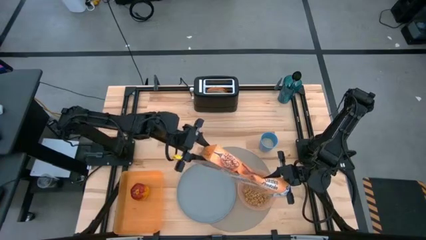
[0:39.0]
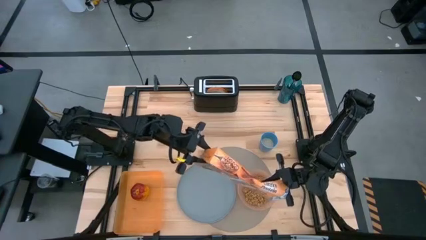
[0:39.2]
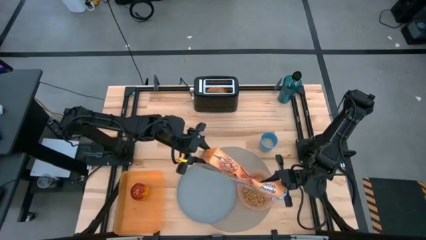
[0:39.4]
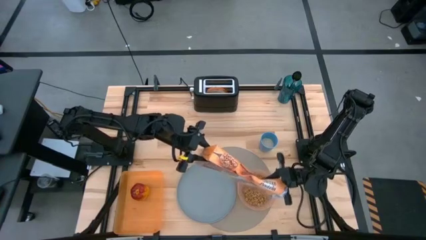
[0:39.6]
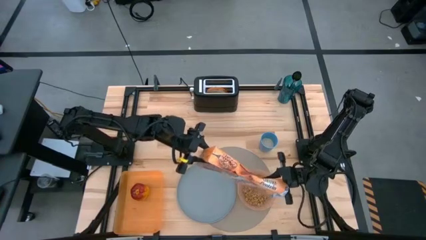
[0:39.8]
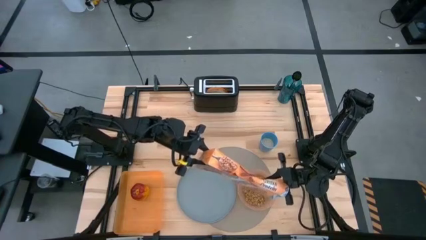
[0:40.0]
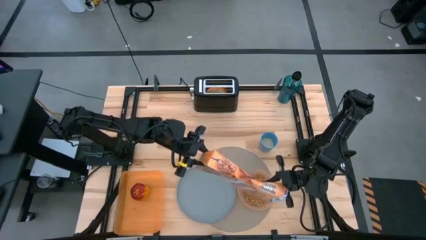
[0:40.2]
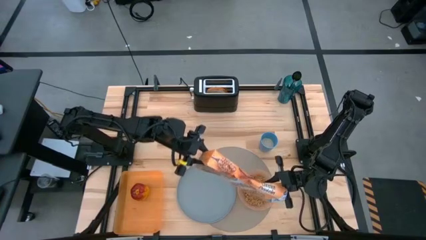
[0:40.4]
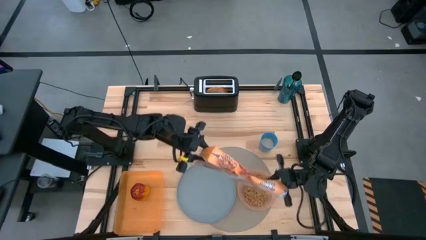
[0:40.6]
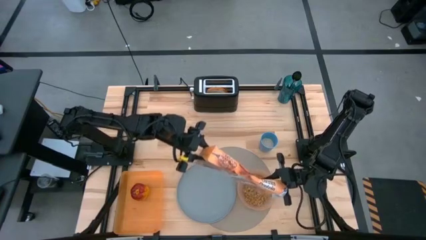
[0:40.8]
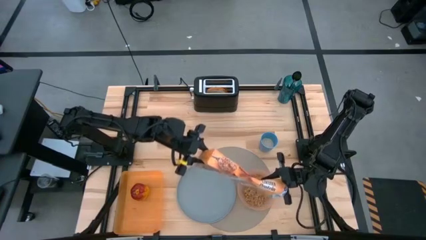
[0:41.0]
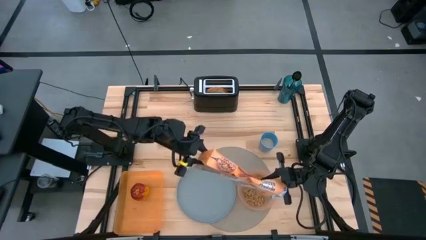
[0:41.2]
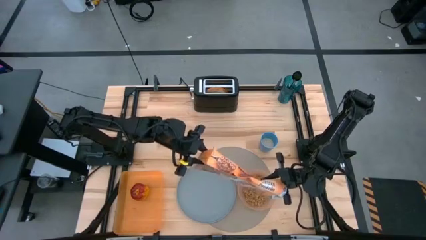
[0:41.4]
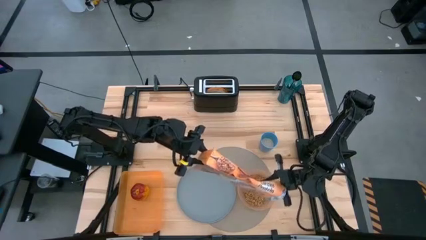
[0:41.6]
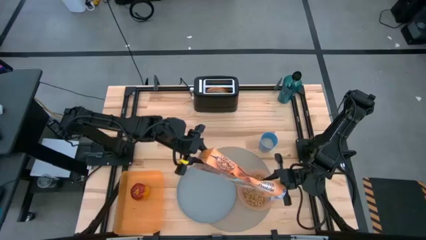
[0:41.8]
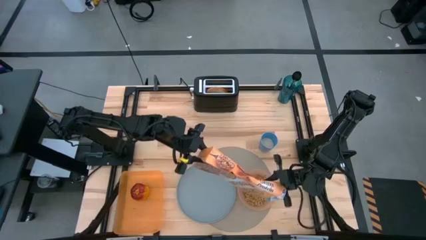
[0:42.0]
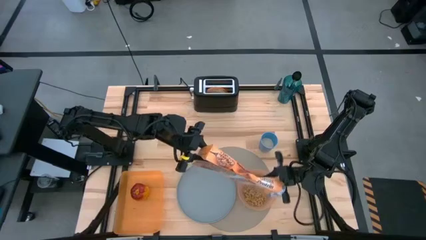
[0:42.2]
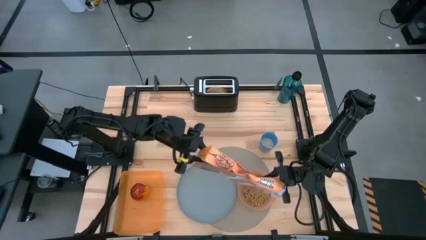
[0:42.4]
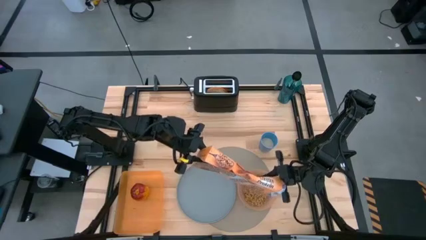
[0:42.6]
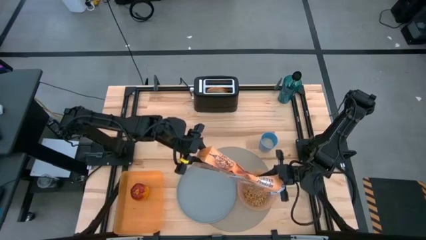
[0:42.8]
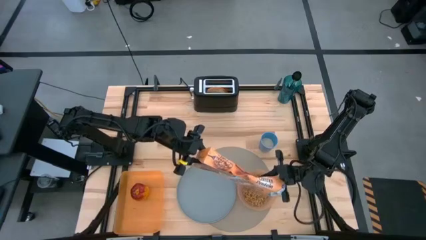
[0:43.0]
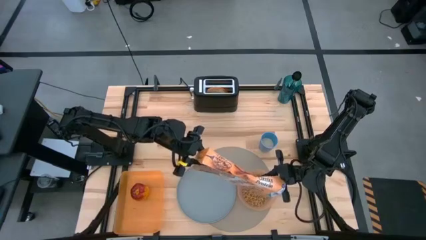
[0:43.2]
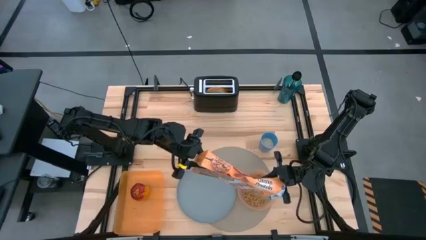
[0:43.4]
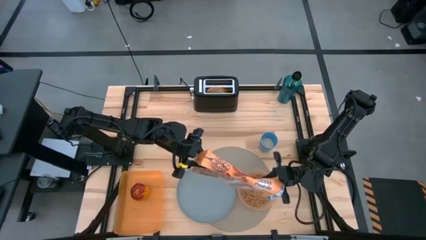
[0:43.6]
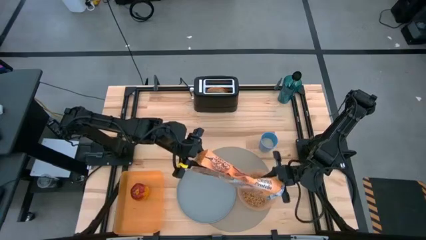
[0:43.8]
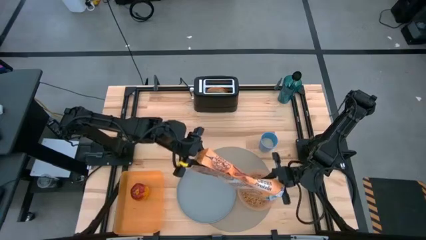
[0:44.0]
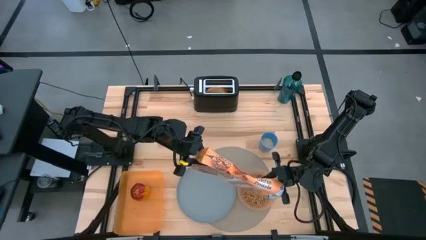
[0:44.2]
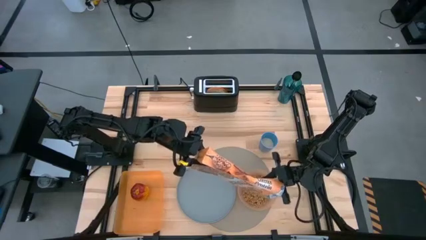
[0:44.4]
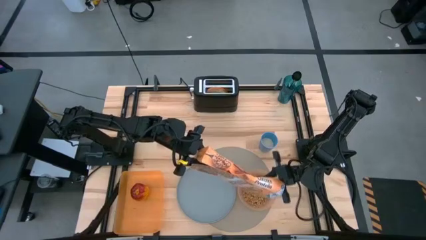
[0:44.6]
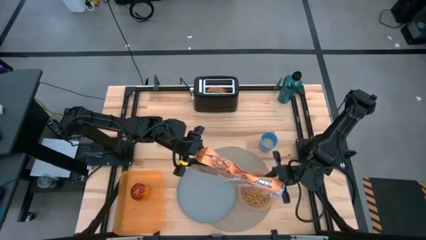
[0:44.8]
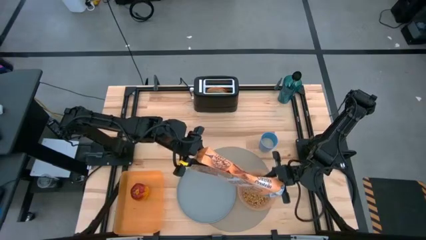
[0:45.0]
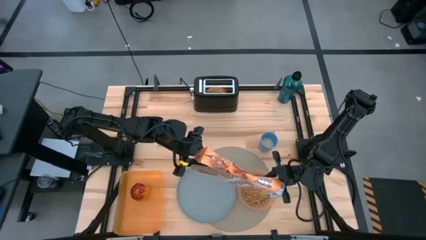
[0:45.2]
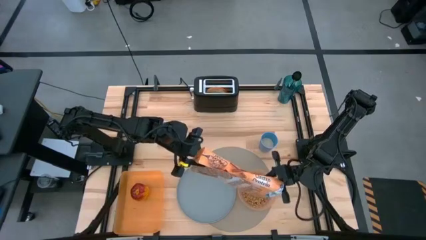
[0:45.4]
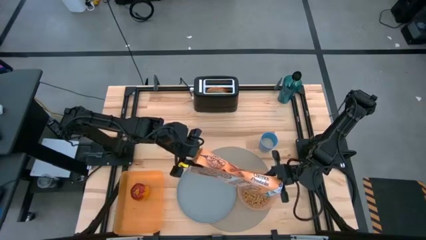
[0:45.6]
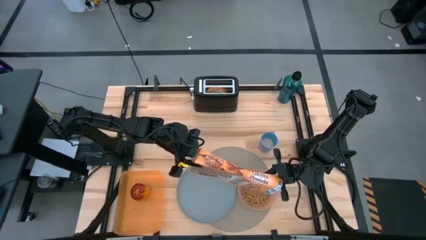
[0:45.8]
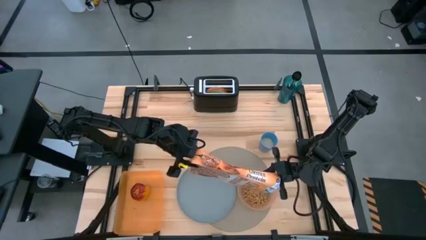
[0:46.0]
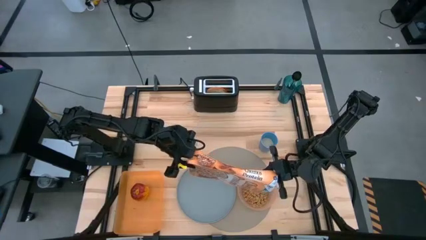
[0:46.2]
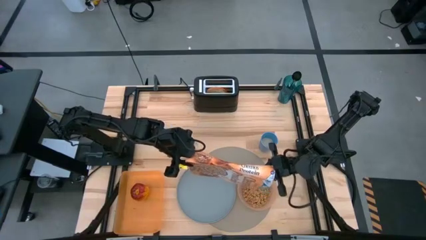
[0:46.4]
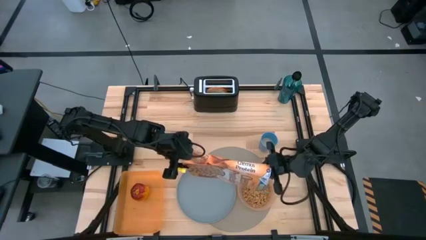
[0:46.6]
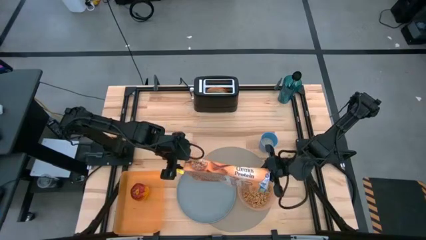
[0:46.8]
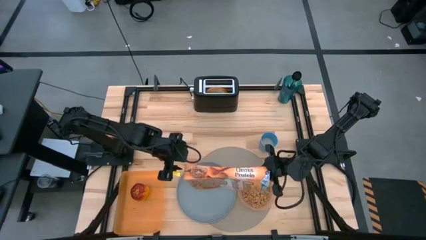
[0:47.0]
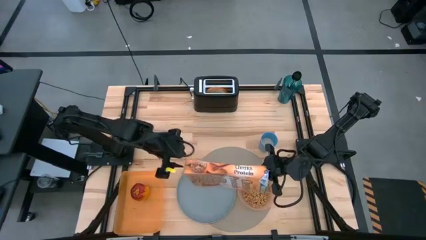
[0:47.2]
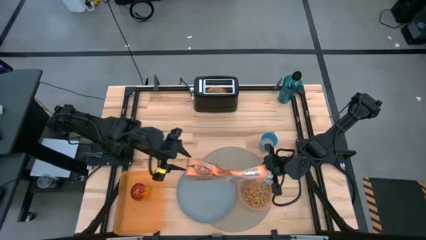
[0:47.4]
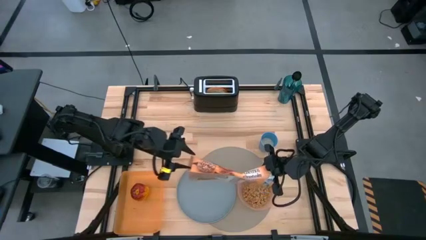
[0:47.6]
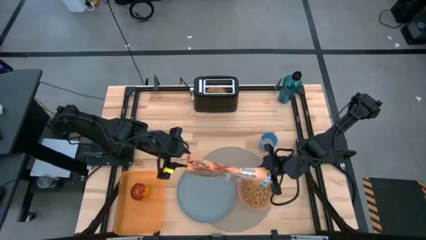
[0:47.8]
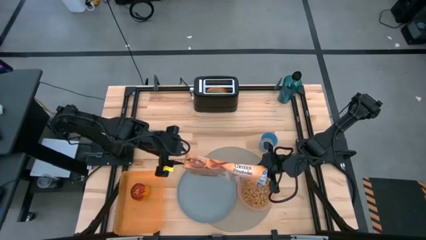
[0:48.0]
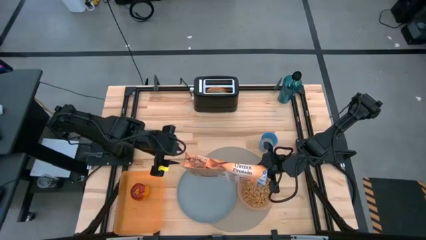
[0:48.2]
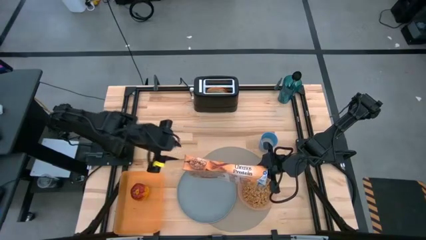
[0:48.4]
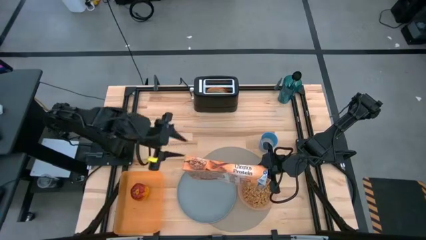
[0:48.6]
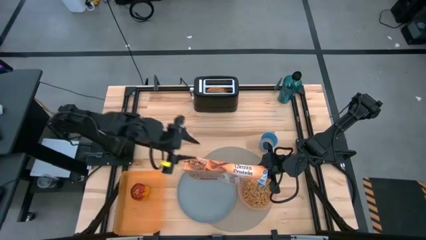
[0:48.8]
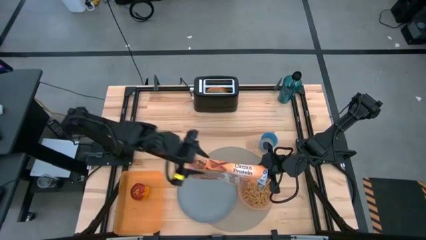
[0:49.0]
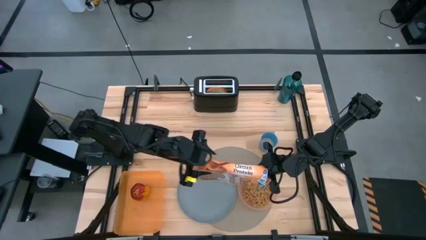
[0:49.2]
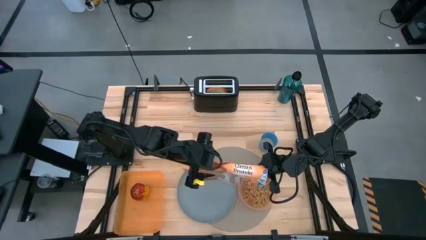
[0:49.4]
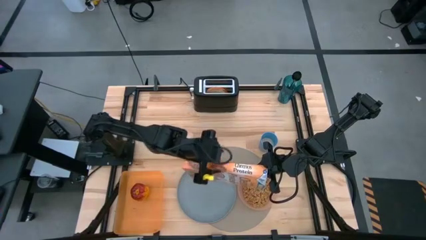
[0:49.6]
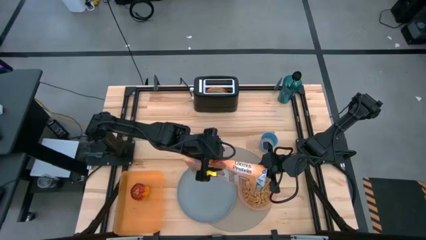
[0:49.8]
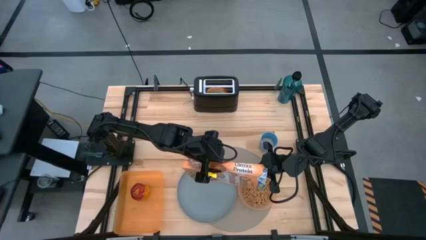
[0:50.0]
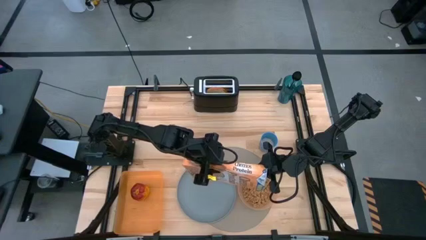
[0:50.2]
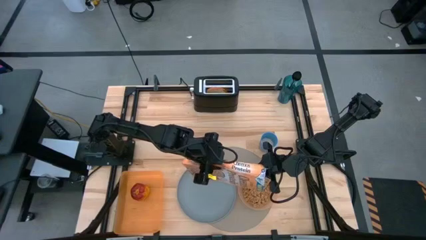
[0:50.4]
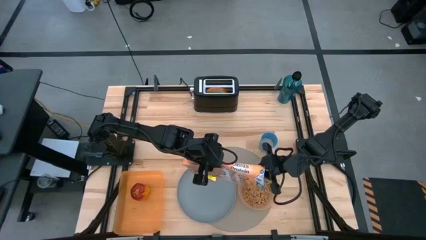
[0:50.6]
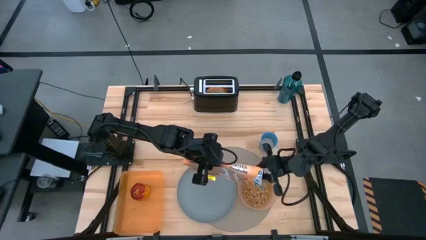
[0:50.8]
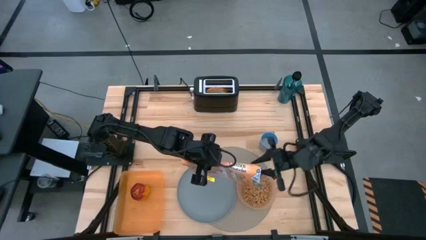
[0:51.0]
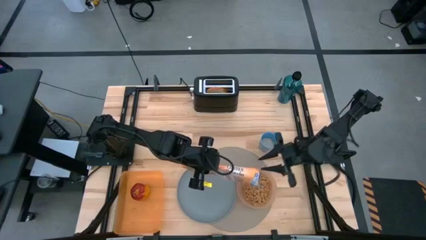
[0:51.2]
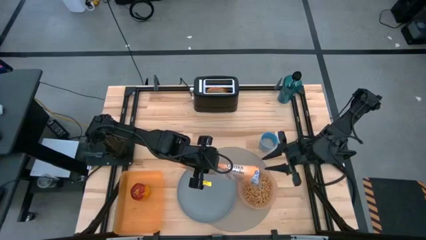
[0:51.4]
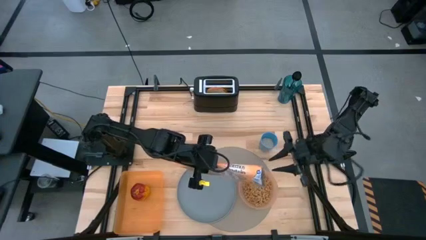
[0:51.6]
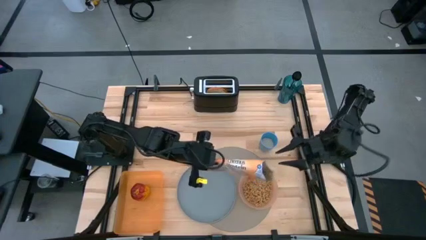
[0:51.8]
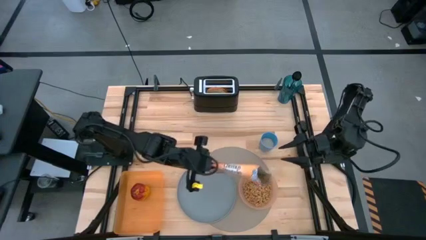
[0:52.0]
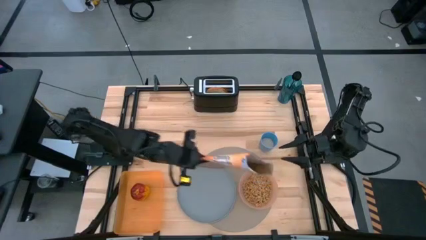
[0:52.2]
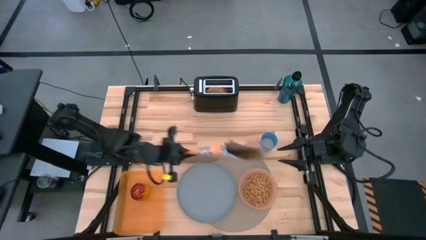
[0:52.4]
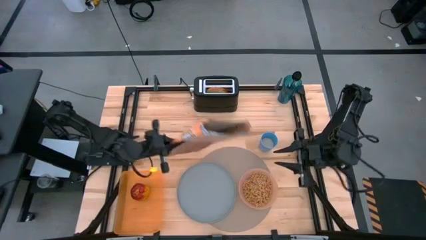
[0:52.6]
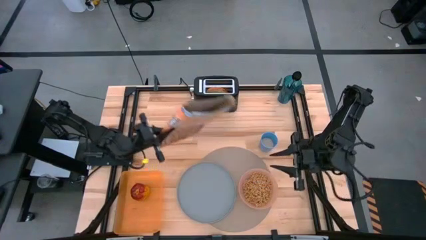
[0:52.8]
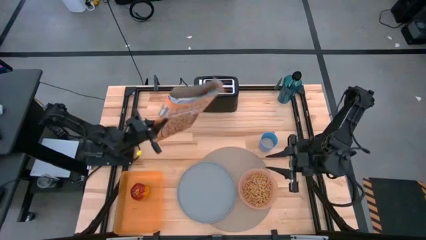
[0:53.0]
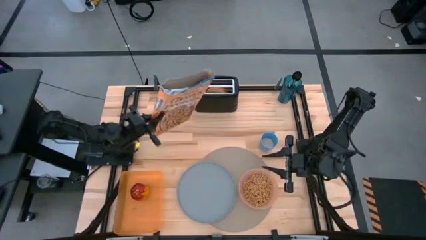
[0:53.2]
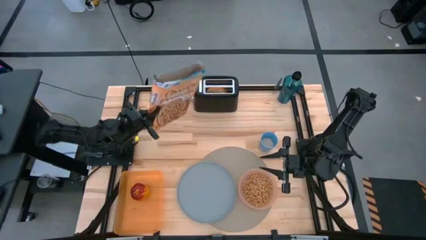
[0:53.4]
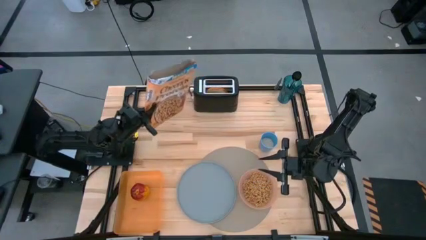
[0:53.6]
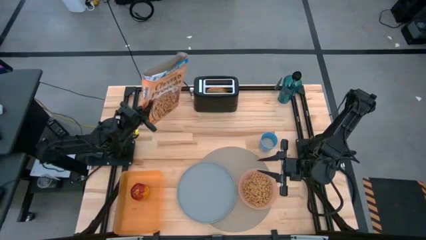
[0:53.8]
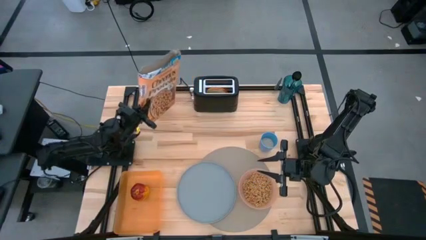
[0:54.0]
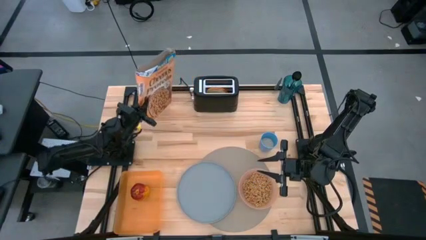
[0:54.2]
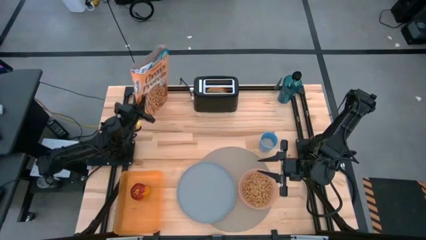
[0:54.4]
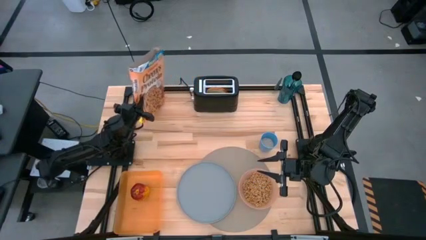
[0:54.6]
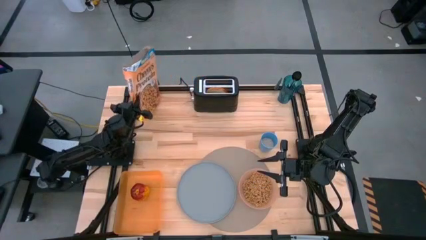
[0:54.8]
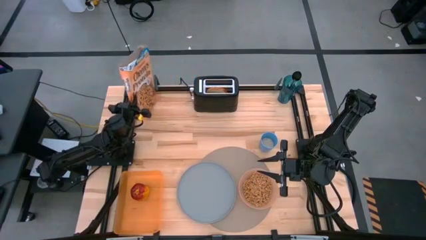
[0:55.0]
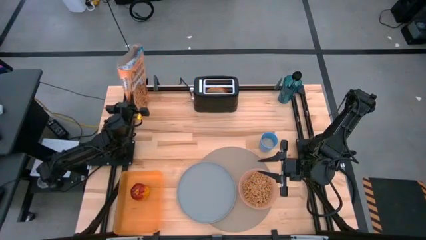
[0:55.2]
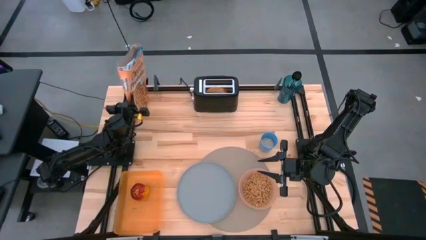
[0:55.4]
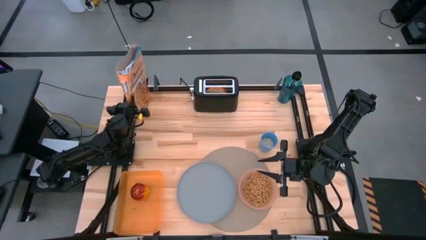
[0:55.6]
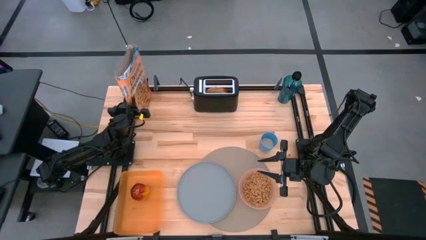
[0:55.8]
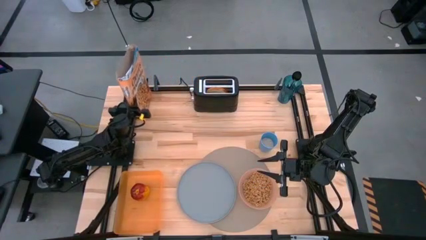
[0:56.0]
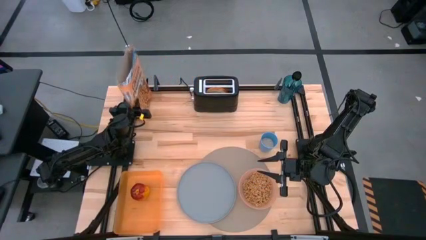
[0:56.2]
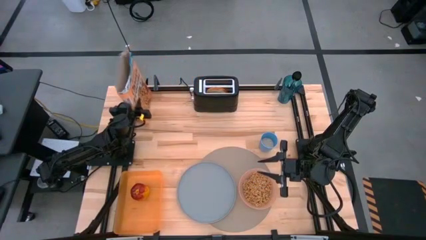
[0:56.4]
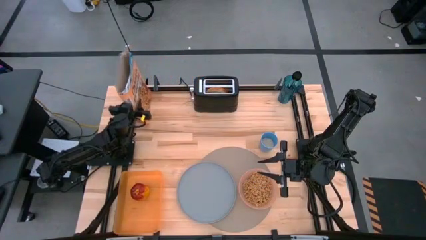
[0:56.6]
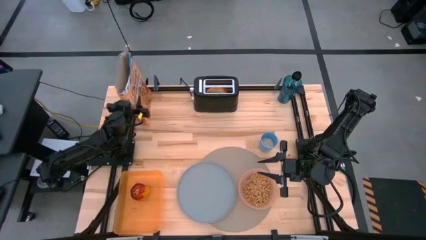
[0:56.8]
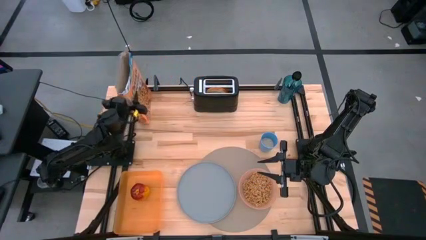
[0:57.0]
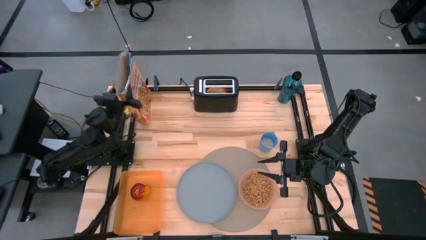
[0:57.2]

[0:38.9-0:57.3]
Task: Arrange a breakfast setting
Pour the cereal from the cereal box into the orange bowl
